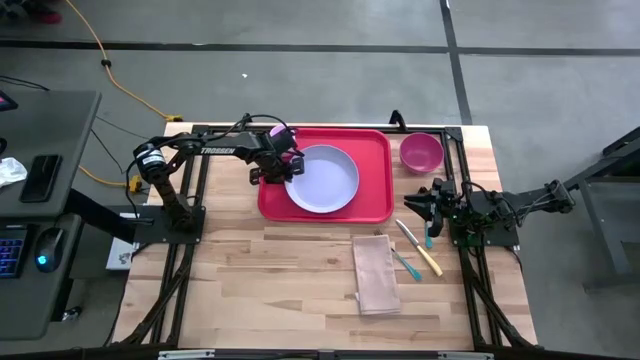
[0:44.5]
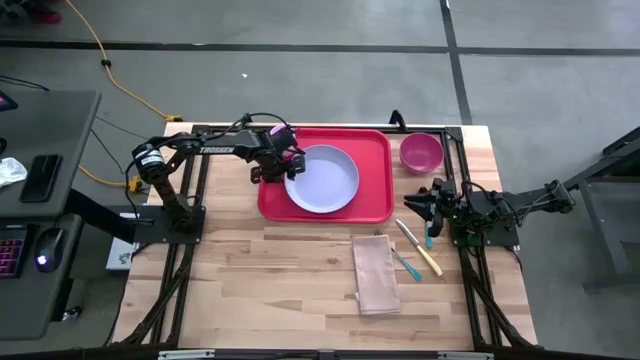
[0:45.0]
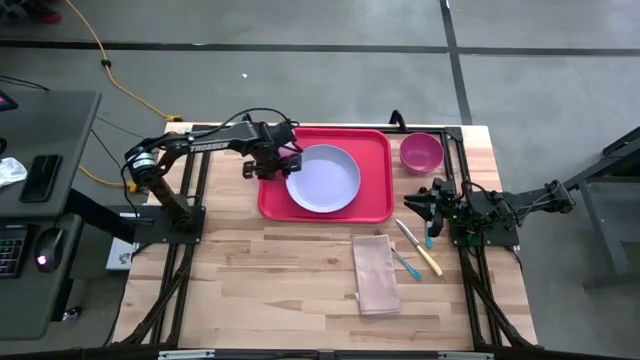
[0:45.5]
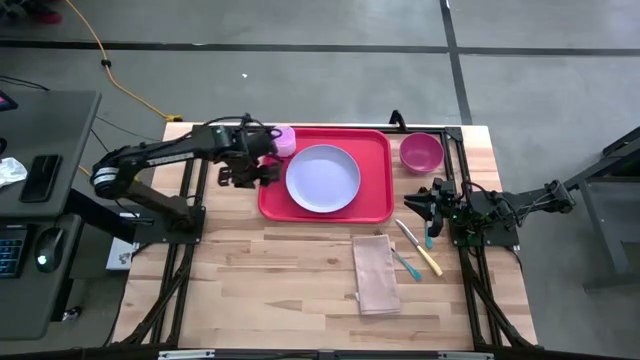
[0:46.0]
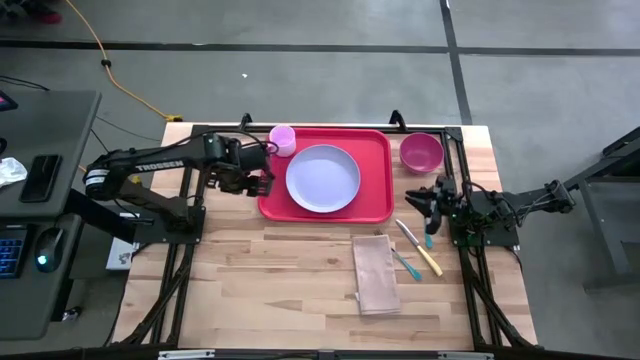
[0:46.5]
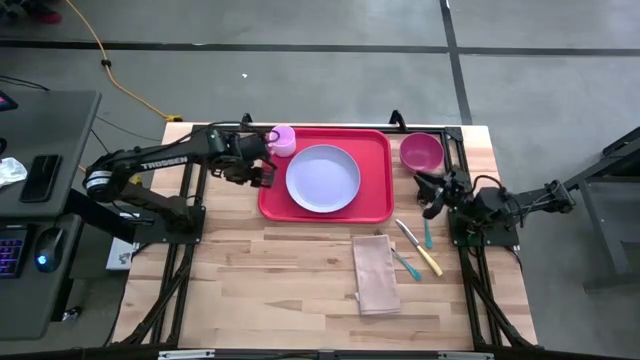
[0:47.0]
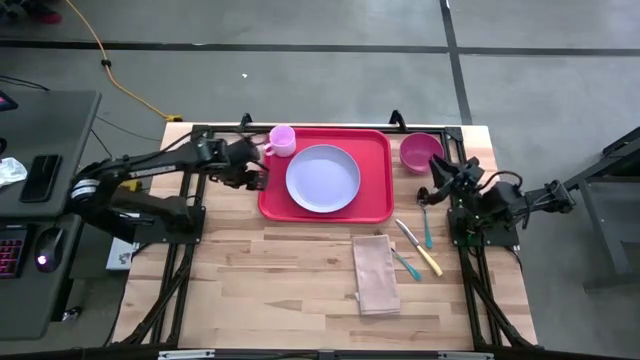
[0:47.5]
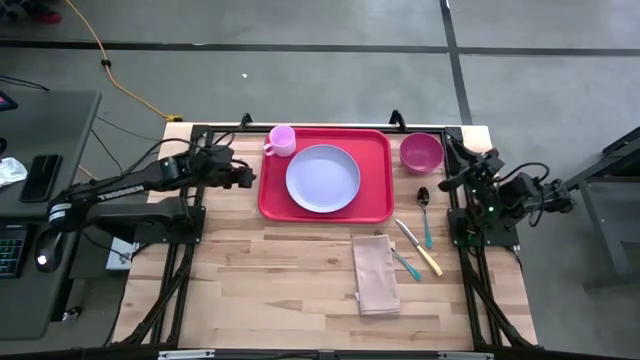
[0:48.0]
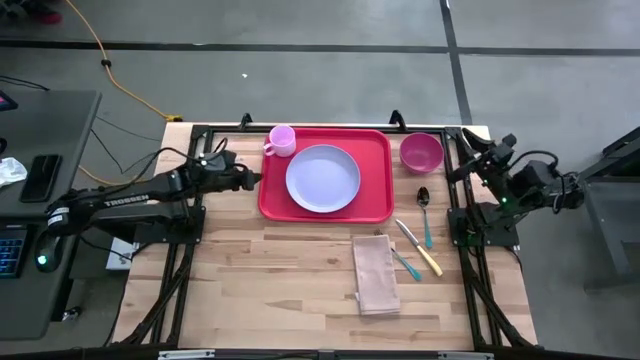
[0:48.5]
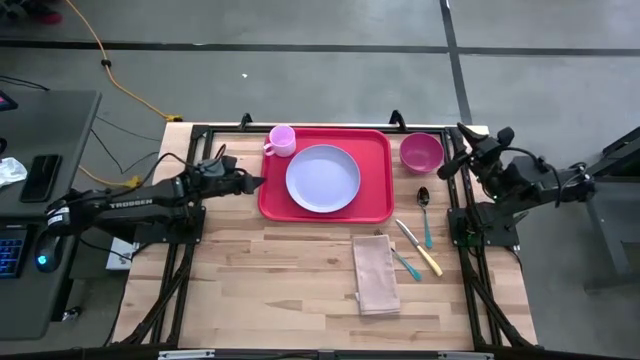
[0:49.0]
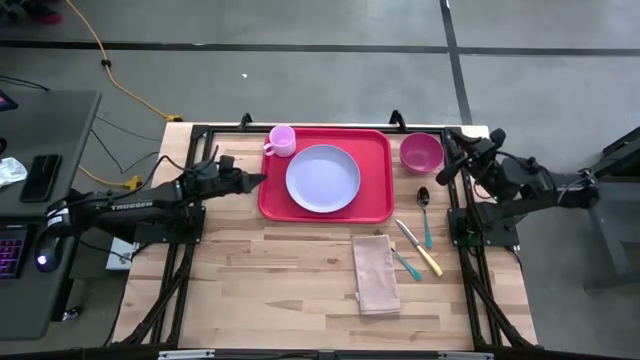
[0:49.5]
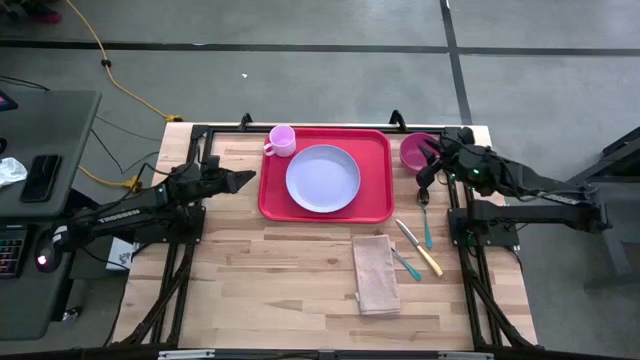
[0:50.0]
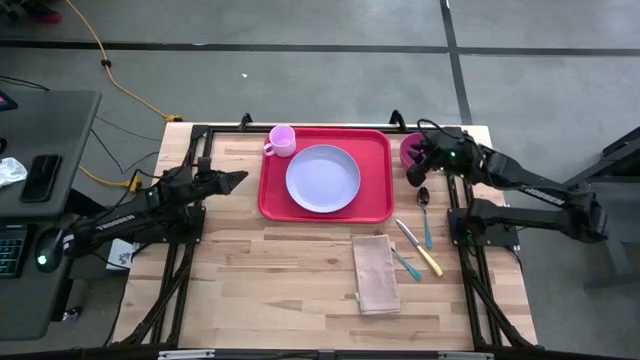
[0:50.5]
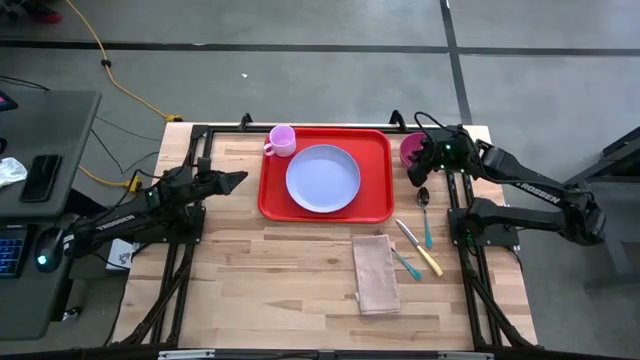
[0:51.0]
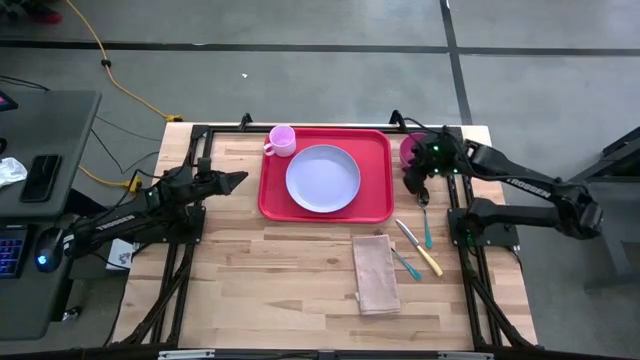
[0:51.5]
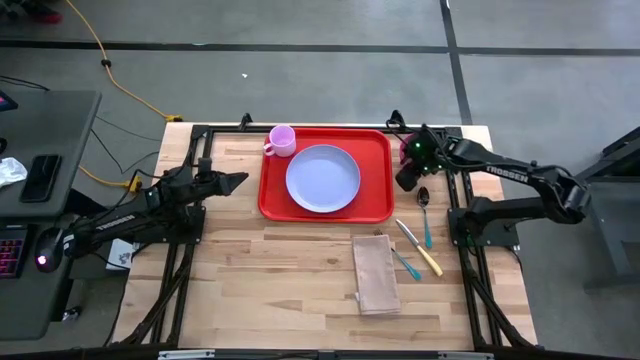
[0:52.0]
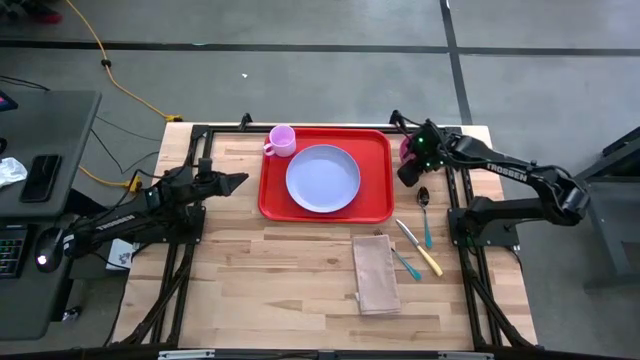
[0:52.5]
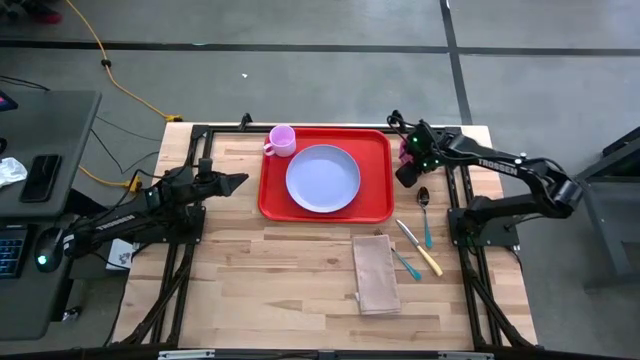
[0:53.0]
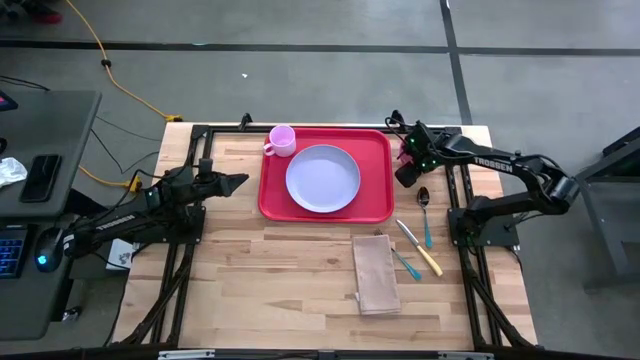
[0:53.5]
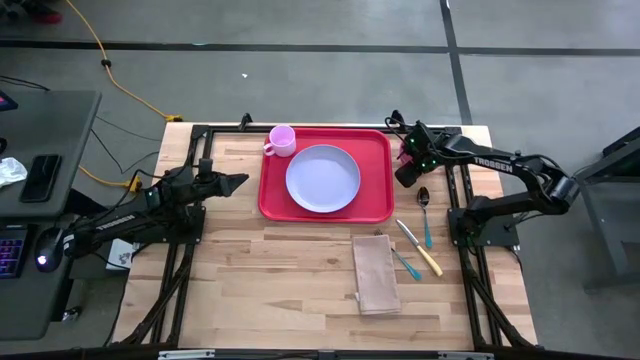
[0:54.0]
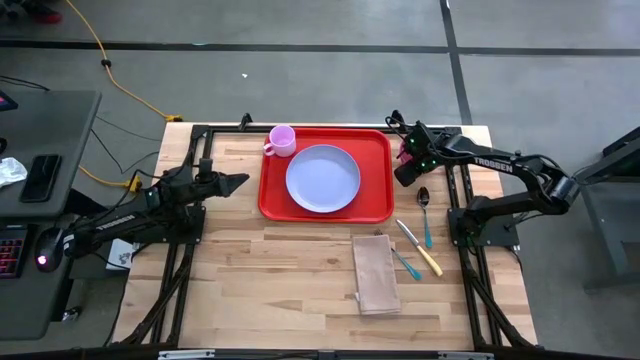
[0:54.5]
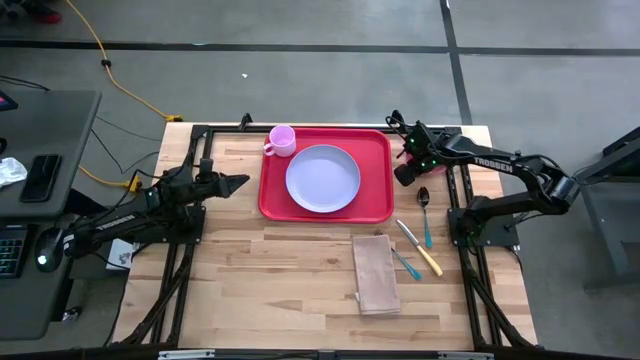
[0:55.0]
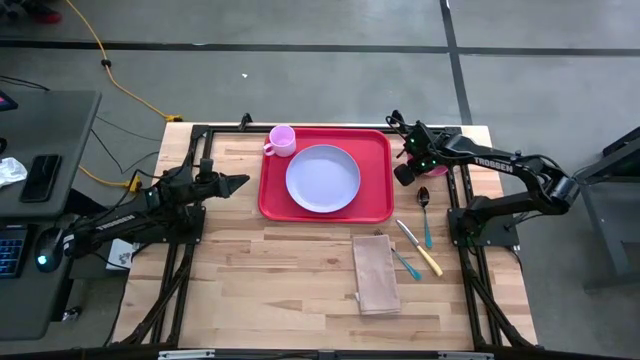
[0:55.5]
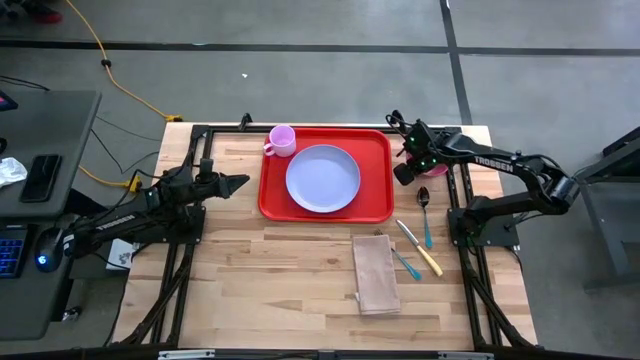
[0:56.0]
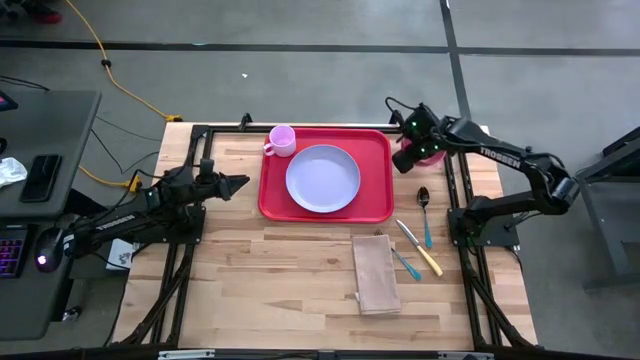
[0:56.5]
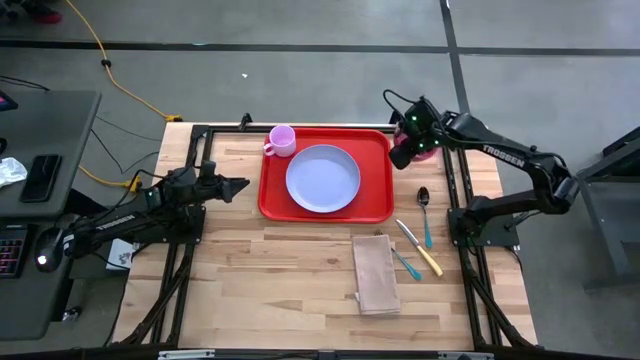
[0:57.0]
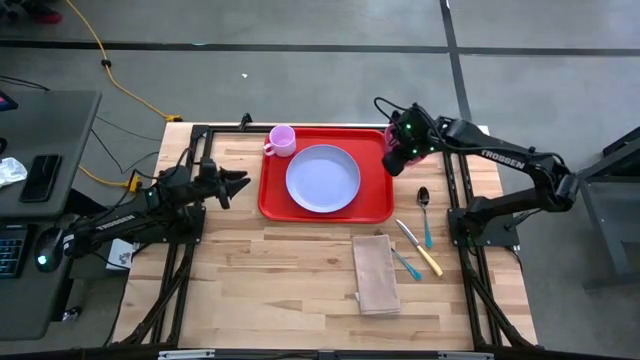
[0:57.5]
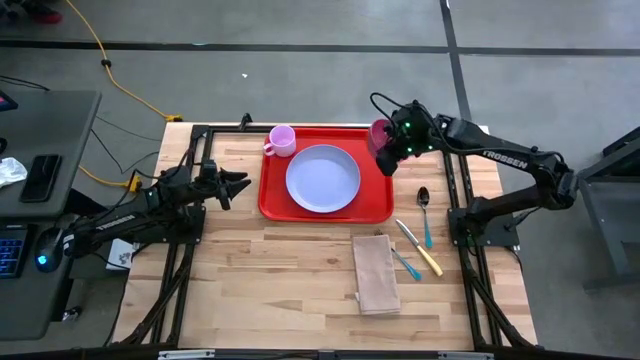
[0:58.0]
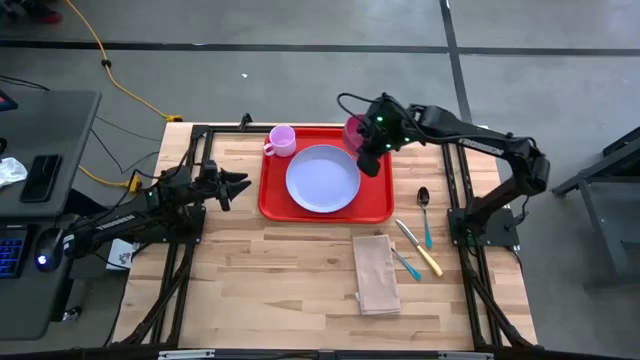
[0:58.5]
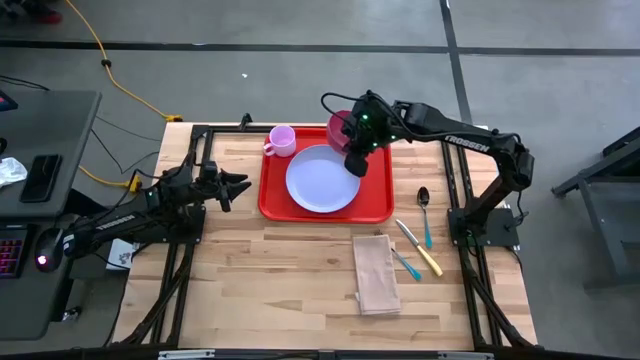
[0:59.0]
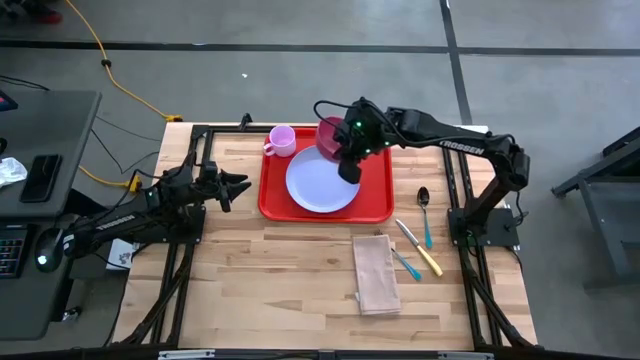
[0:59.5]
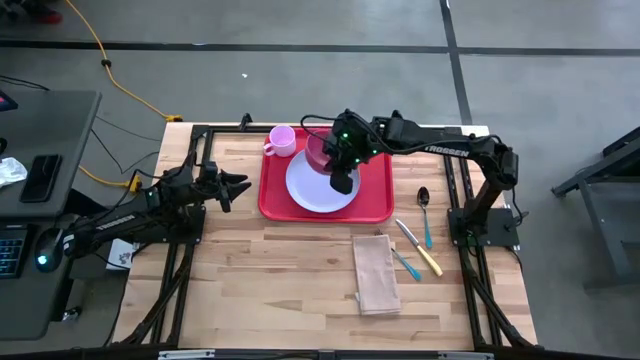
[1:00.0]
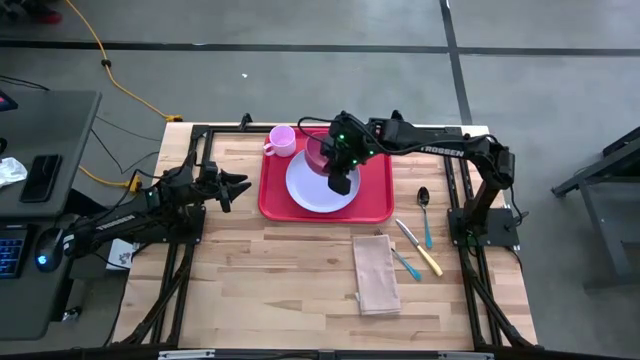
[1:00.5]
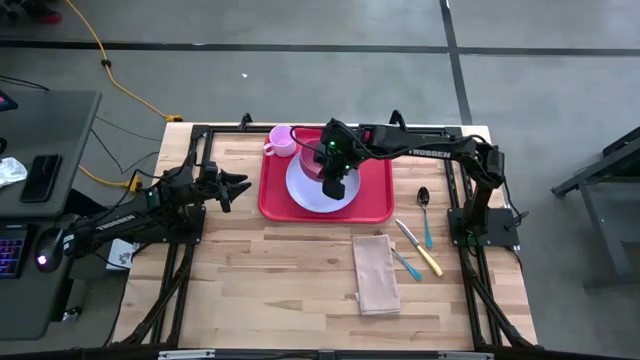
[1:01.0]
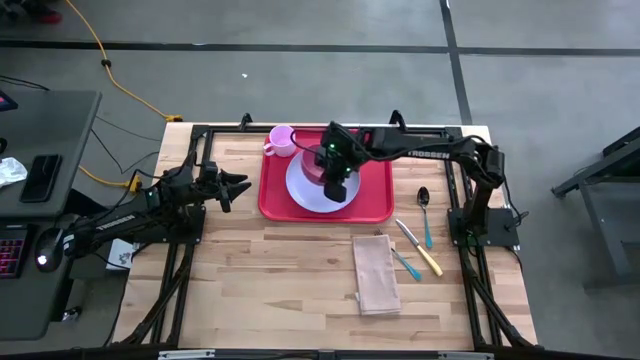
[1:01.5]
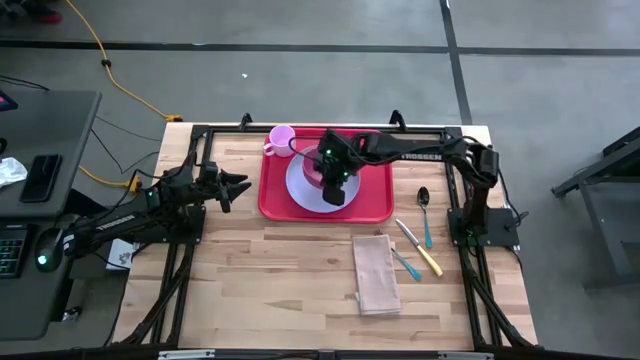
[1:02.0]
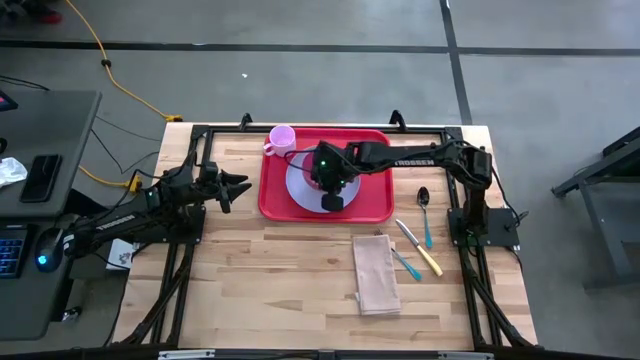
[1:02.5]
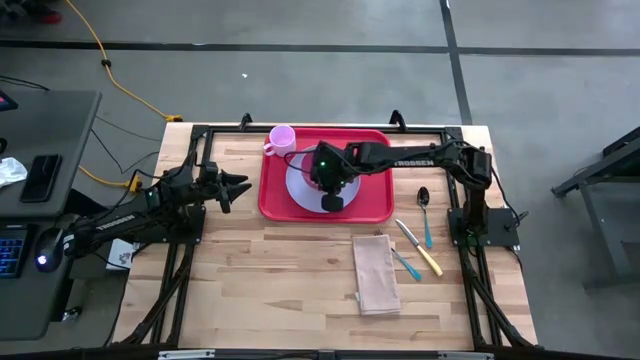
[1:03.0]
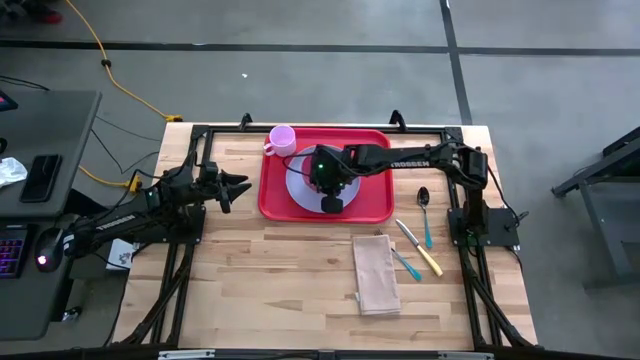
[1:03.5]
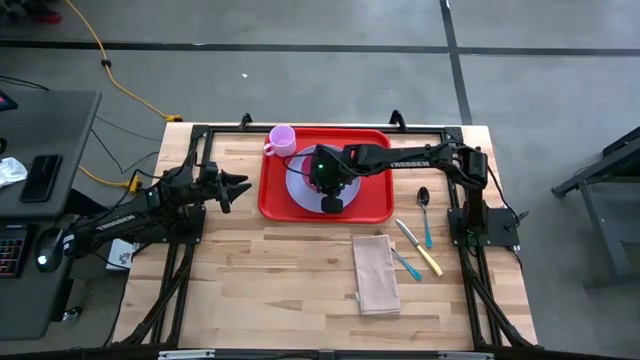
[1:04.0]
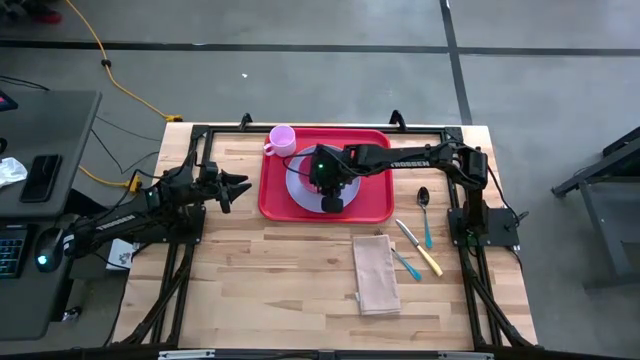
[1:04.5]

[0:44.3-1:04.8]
Task: Set up tray
Put the red bowl on the light blue plate on the tray
